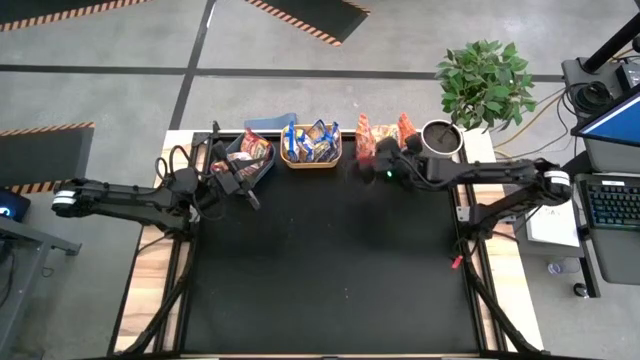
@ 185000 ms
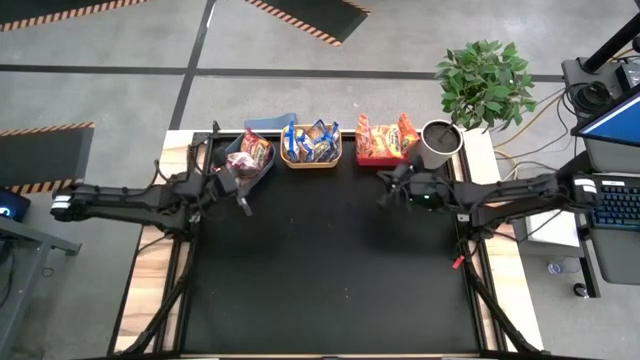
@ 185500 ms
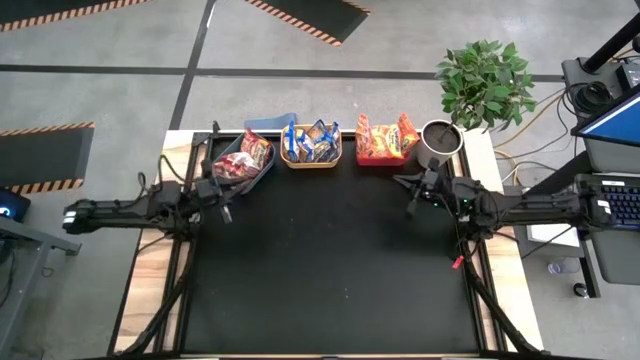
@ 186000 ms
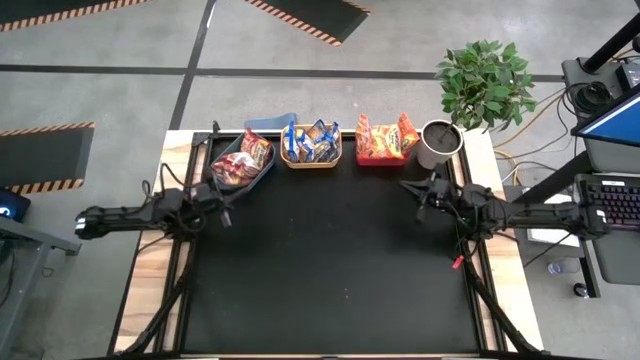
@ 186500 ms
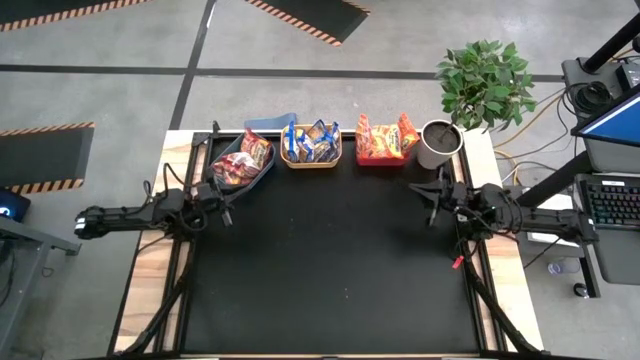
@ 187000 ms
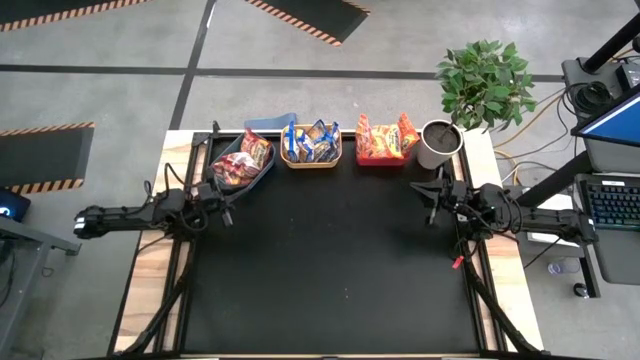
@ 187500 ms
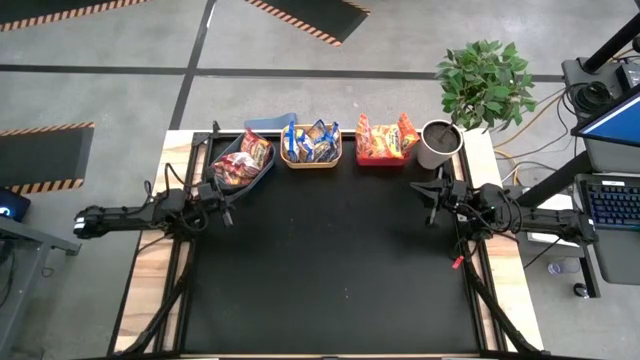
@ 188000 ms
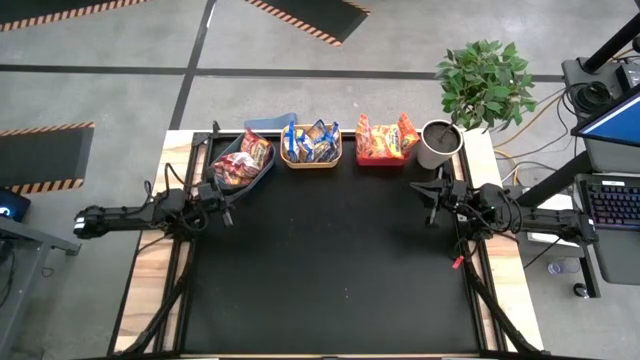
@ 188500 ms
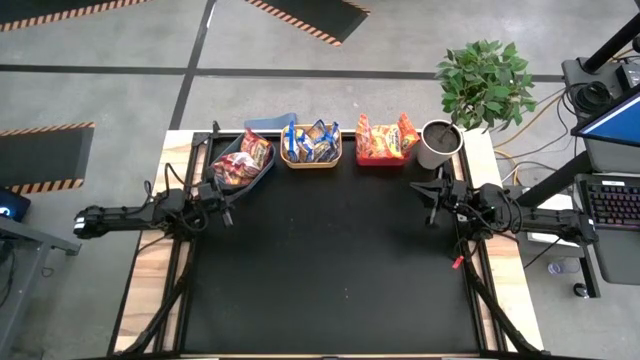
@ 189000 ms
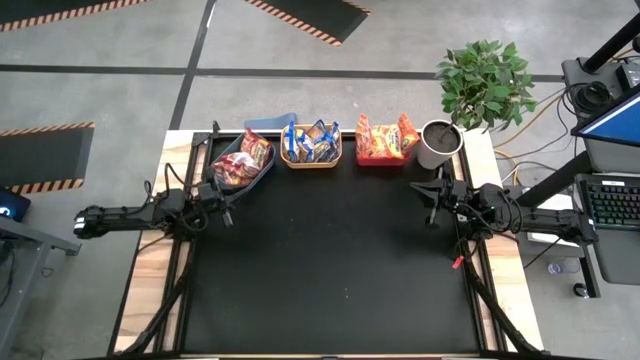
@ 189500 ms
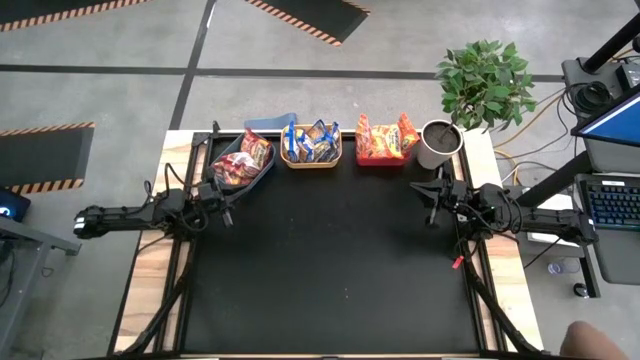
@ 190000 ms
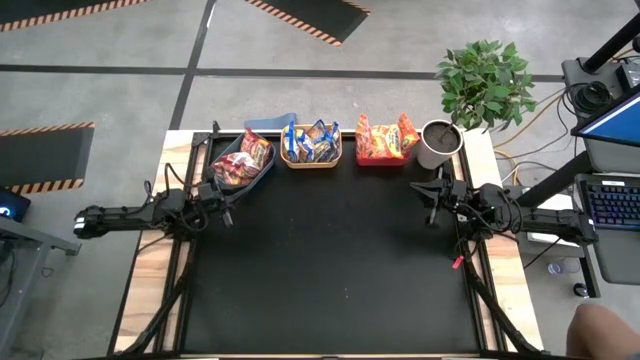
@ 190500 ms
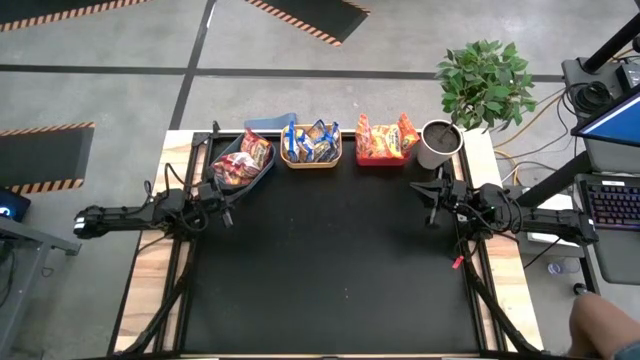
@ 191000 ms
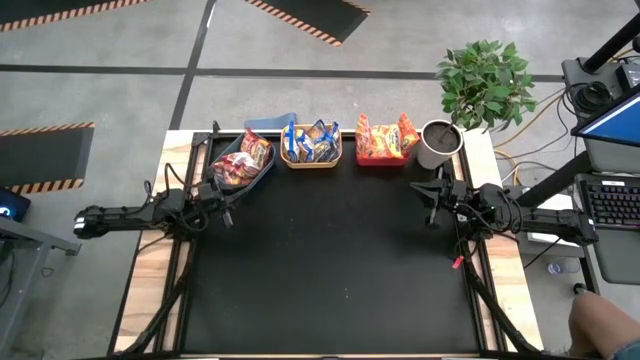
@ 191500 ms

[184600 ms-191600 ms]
Task: Sort Maruchan noodles
Return to Home Position

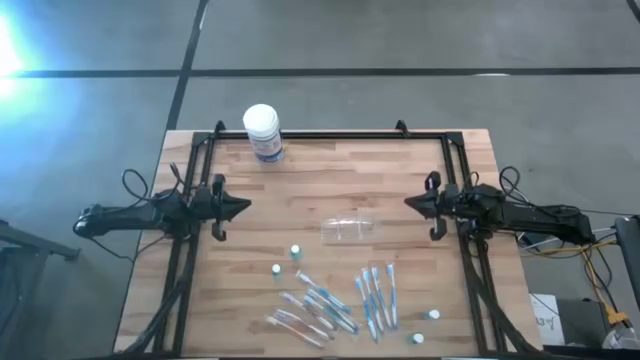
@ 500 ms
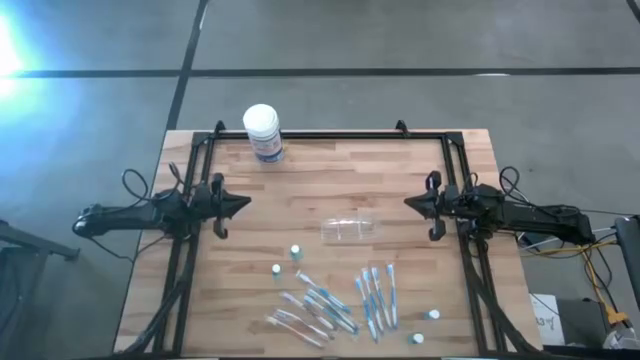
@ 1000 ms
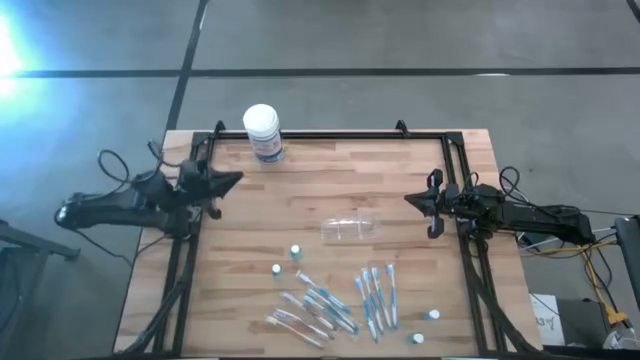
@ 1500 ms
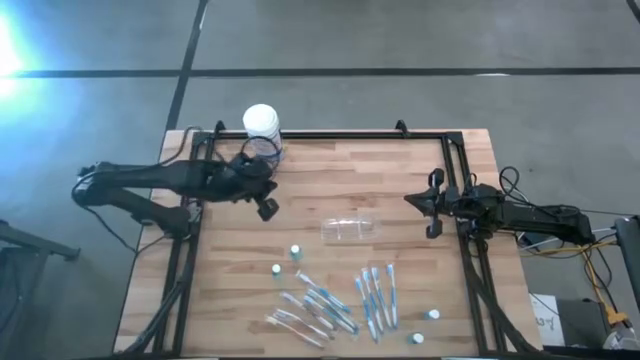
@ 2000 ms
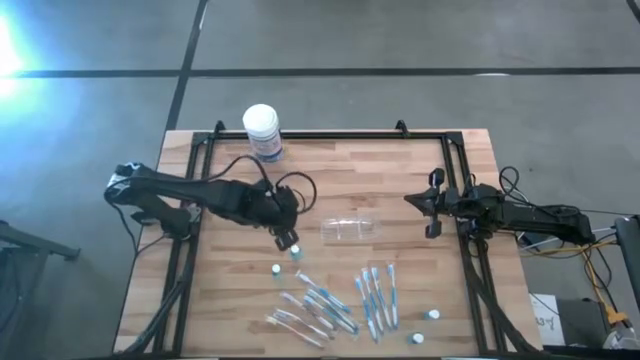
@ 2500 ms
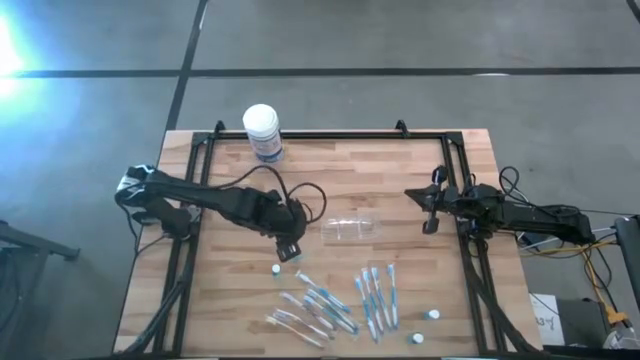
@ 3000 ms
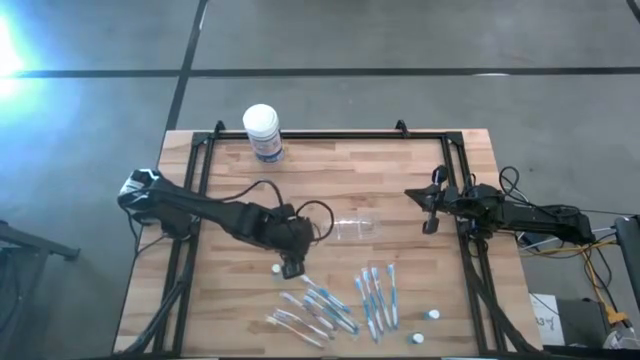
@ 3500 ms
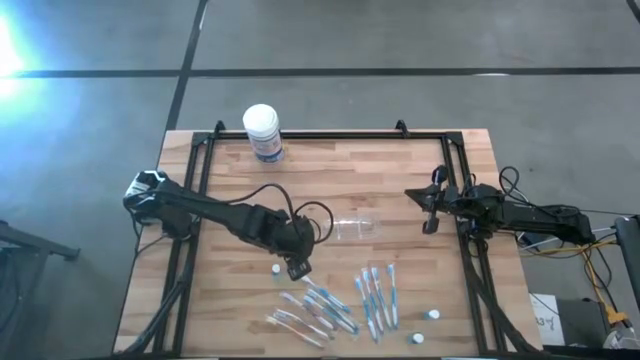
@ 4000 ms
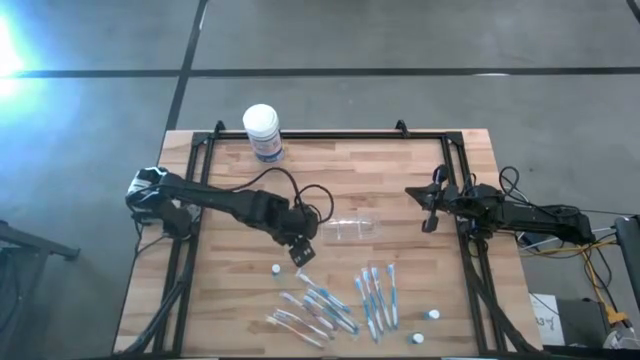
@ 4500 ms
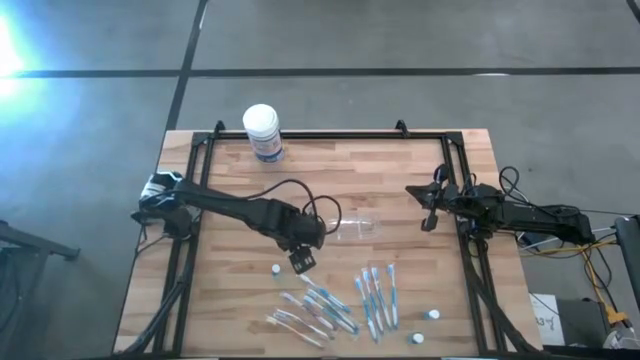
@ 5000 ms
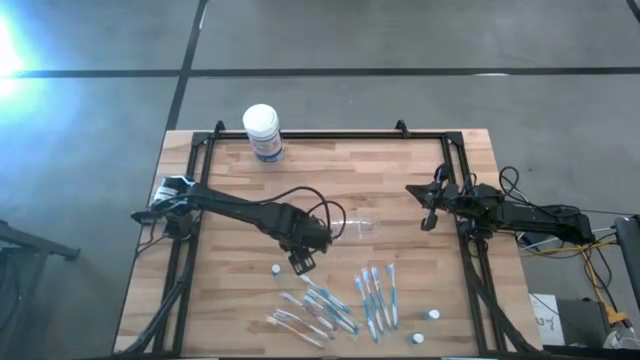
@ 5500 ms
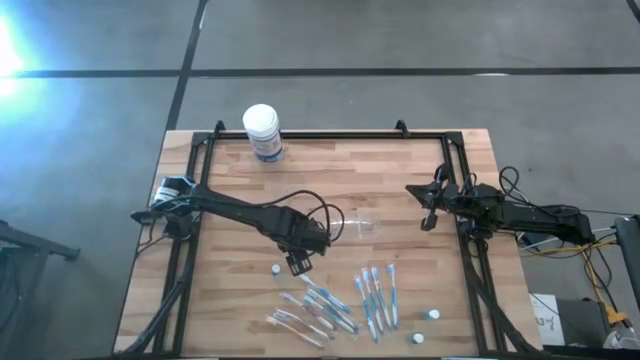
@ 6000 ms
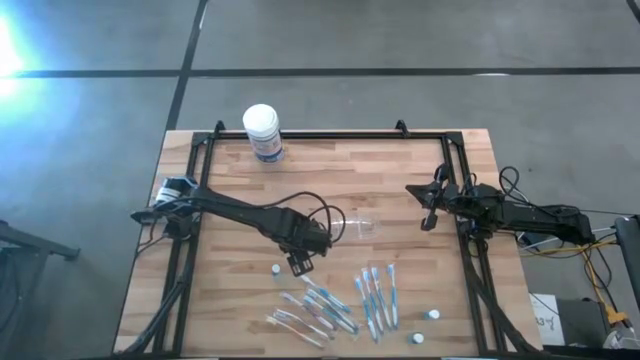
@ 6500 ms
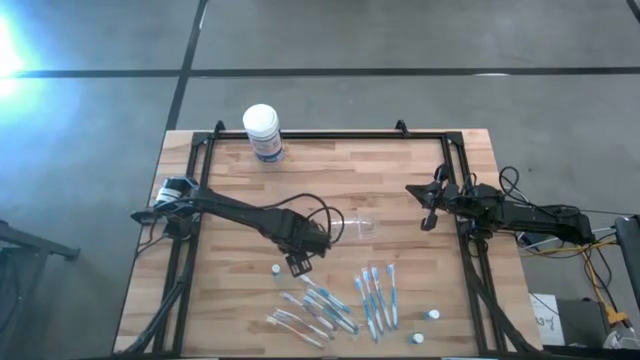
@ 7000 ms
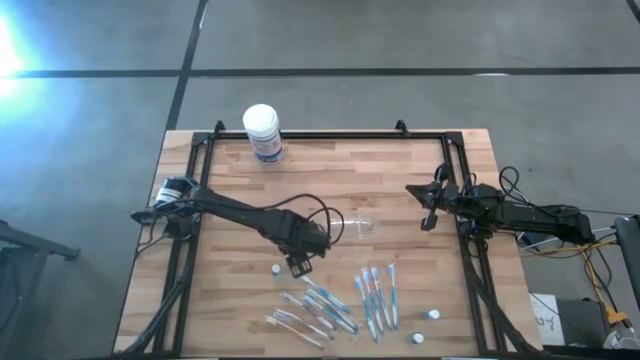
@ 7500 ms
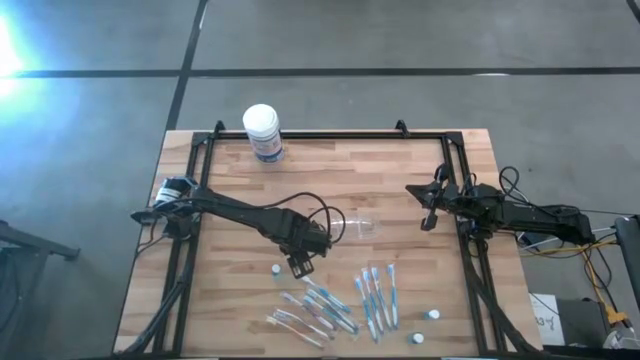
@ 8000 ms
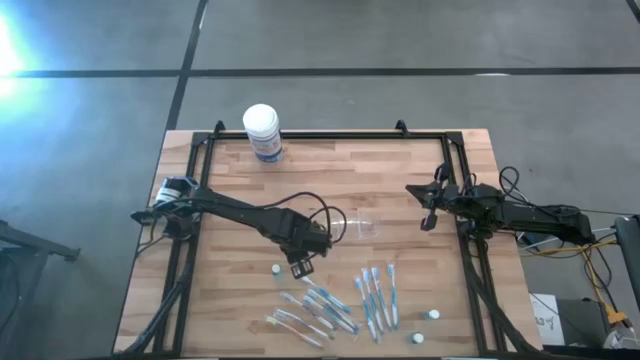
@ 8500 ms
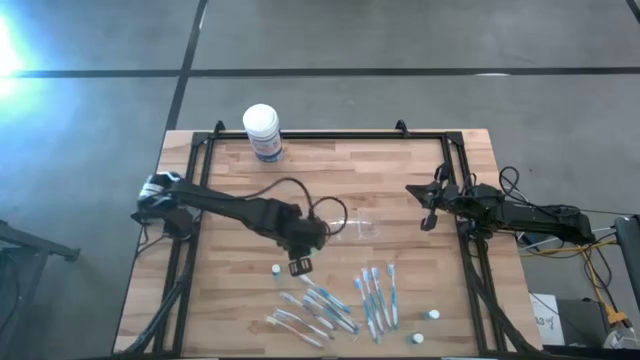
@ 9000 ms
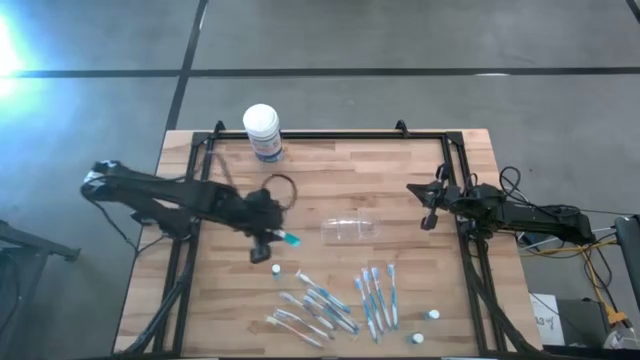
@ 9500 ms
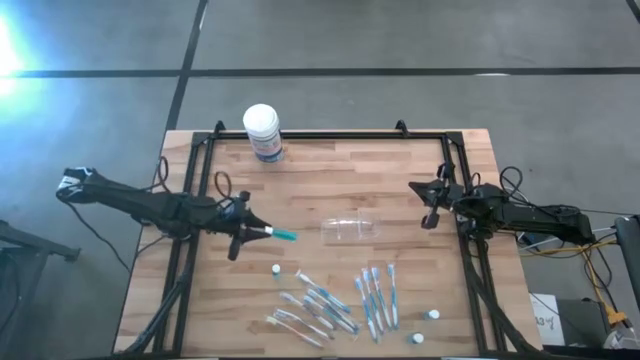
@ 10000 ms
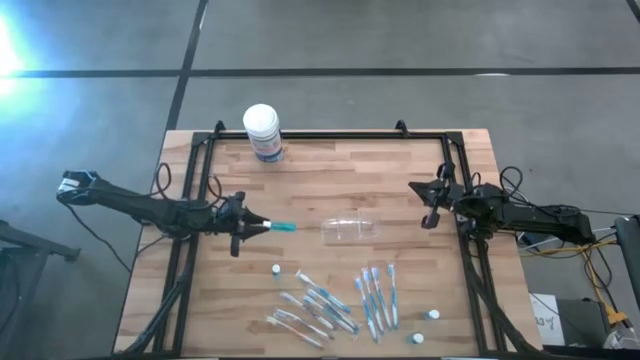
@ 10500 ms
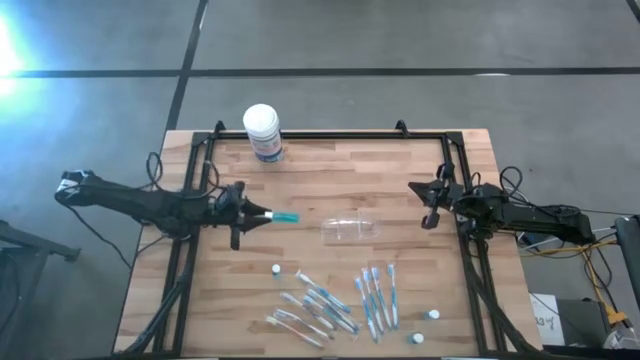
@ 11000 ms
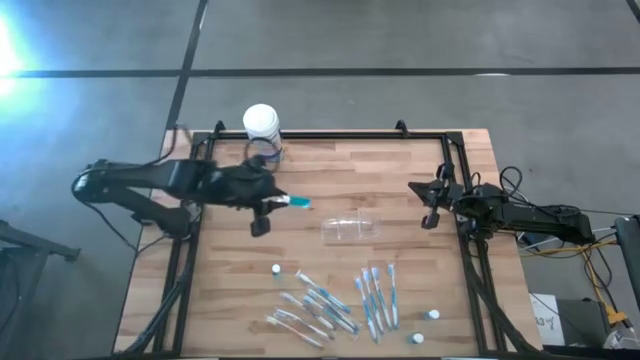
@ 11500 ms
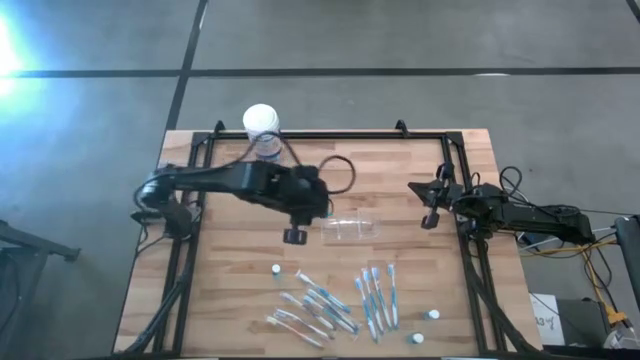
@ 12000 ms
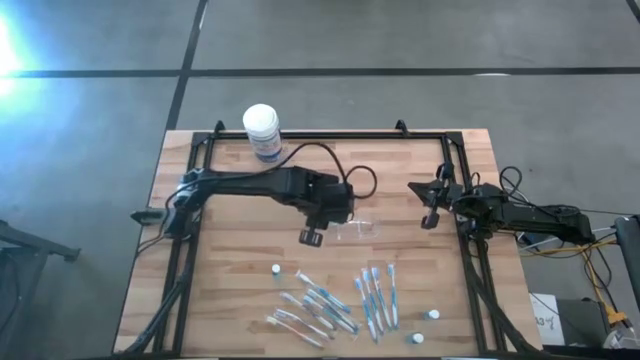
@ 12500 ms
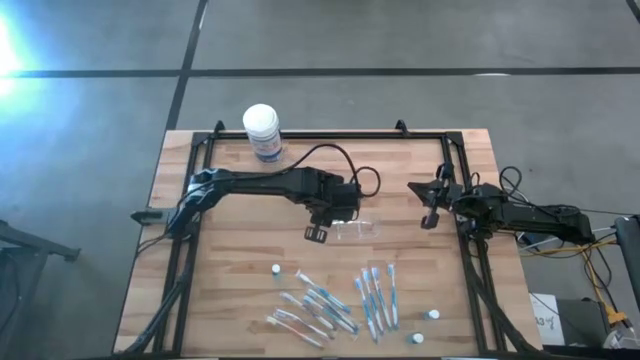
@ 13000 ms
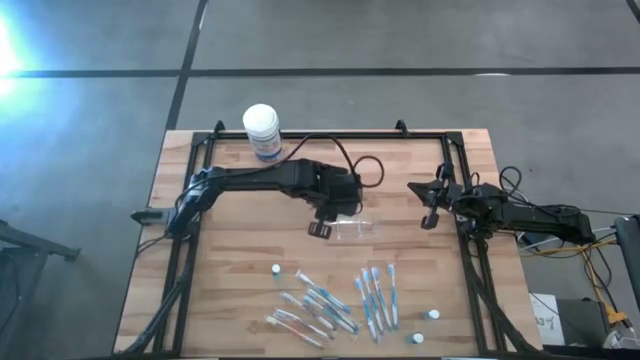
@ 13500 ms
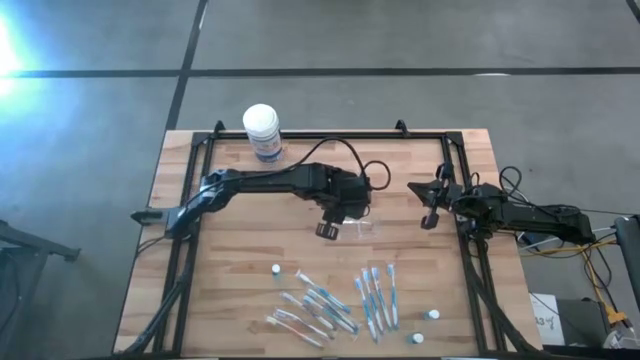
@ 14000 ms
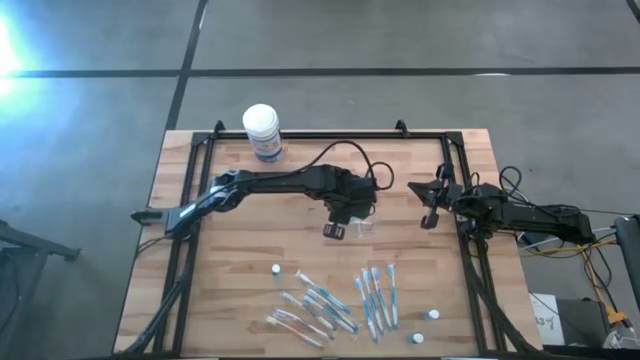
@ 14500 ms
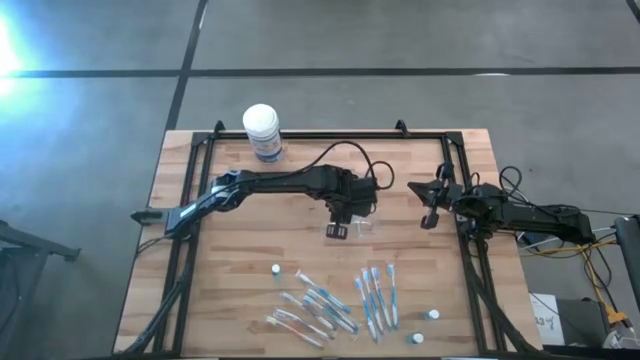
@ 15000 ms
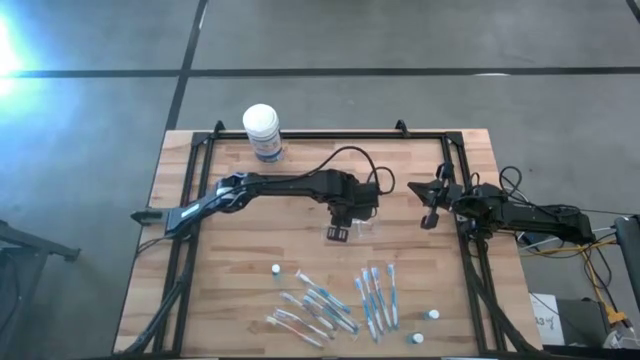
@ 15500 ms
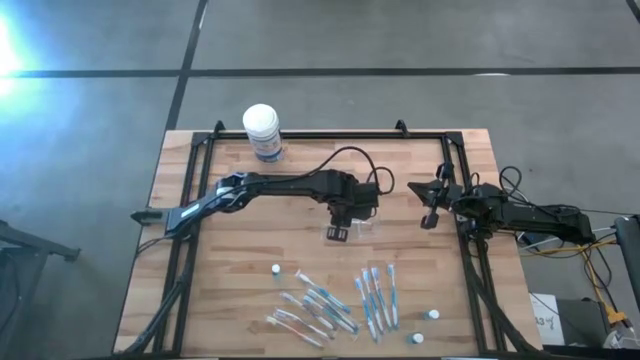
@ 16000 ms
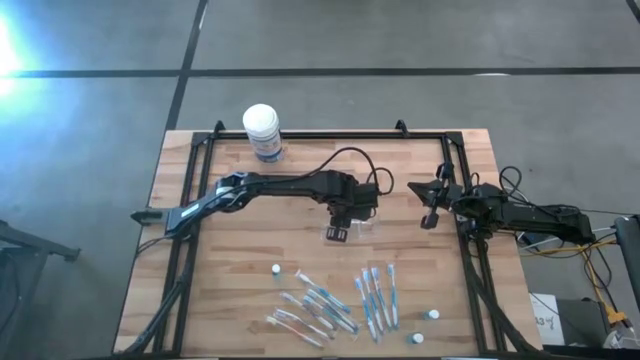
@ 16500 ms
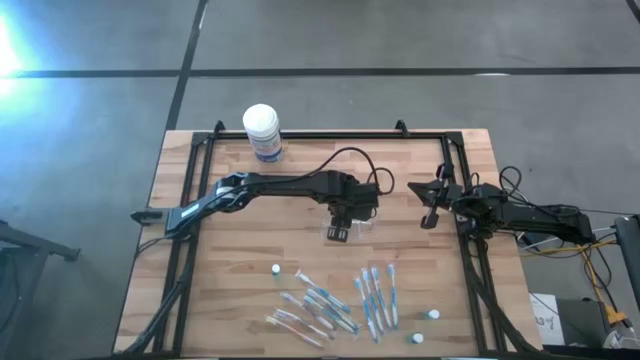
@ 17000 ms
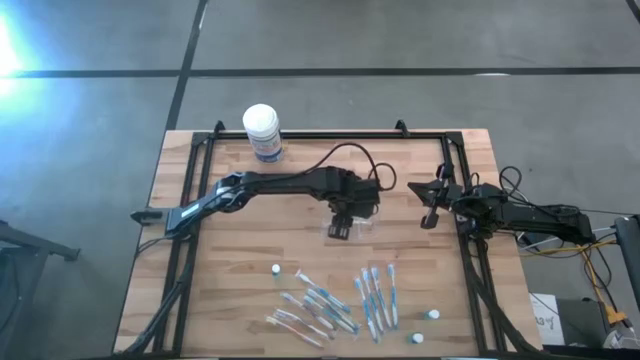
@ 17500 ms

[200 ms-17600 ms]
Task: Pick & Place toothbrushing station
Put the blue mouthwash into the transparent organizer
